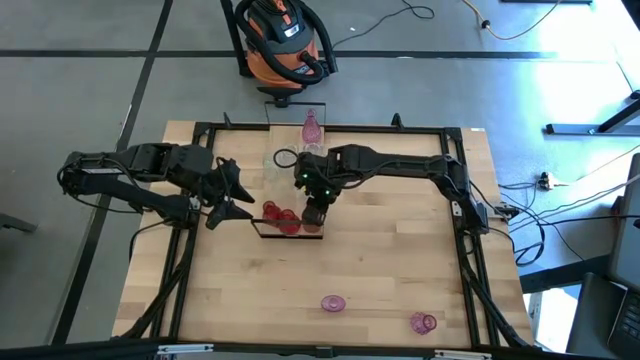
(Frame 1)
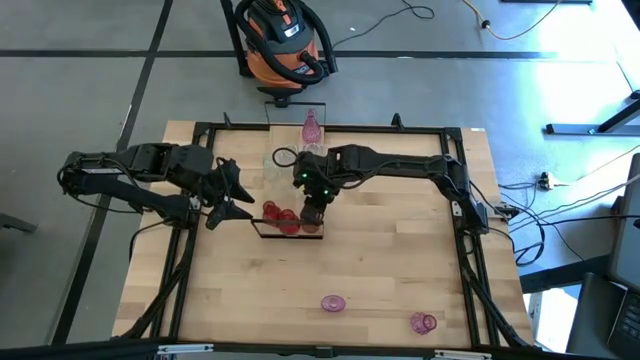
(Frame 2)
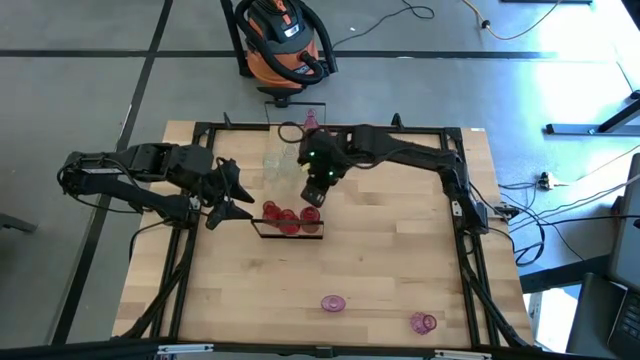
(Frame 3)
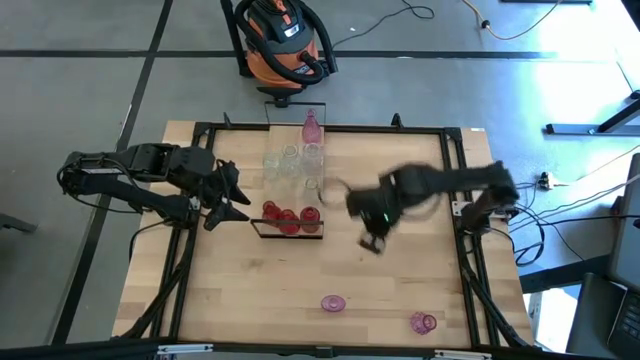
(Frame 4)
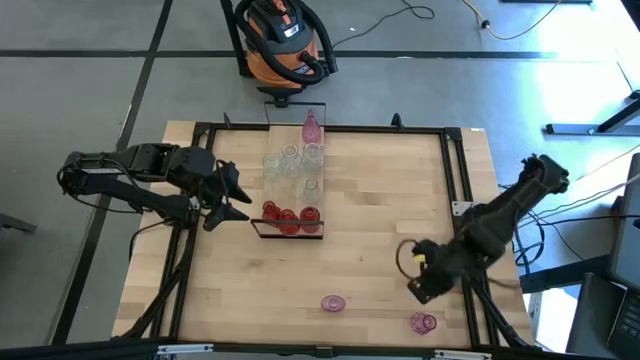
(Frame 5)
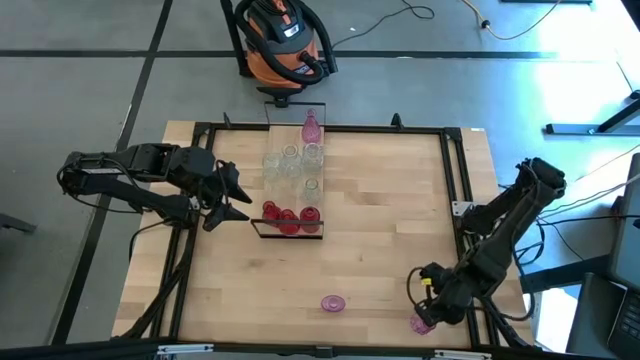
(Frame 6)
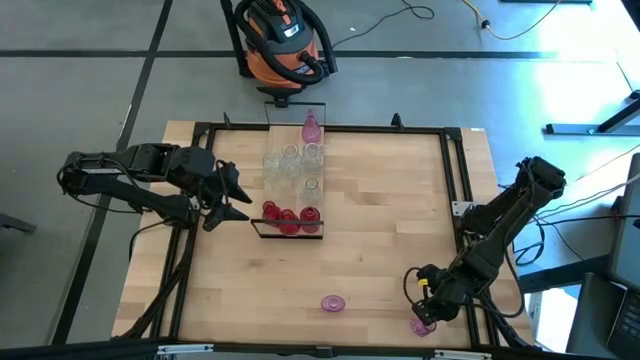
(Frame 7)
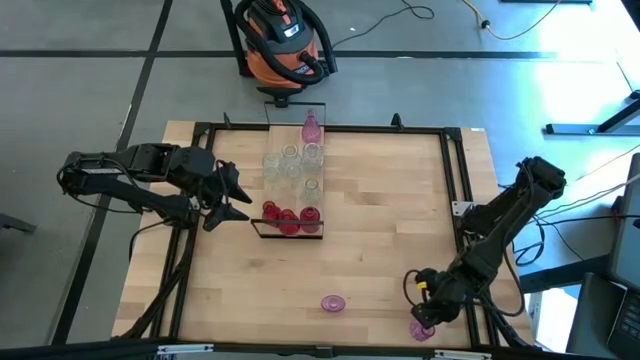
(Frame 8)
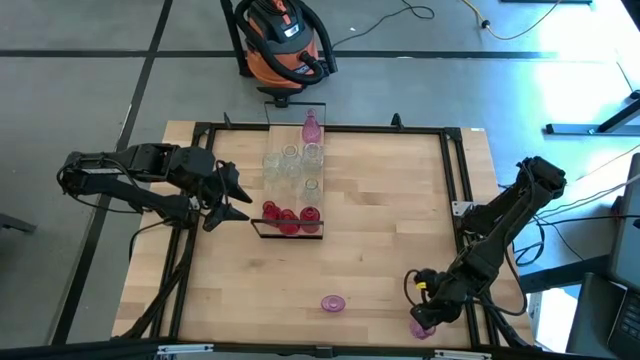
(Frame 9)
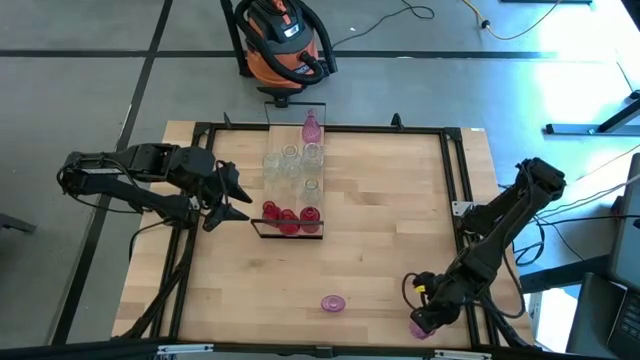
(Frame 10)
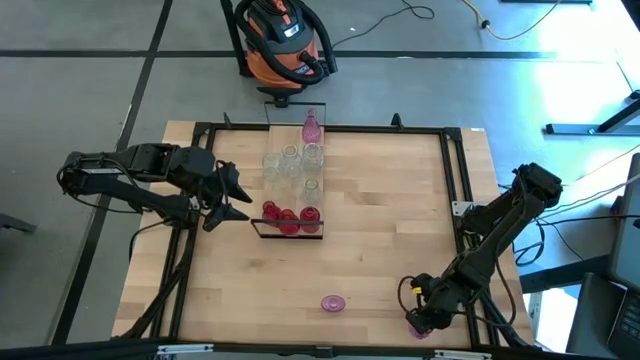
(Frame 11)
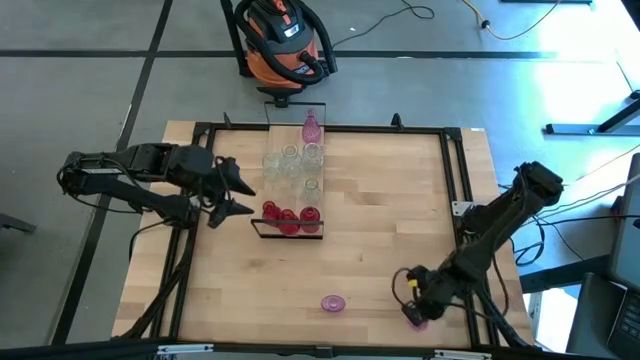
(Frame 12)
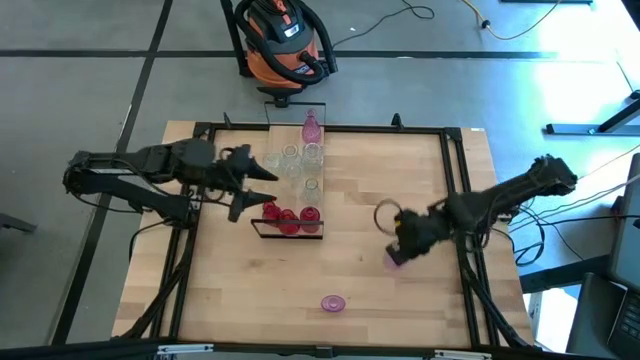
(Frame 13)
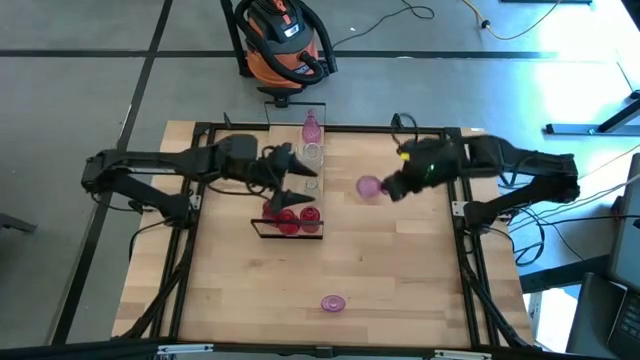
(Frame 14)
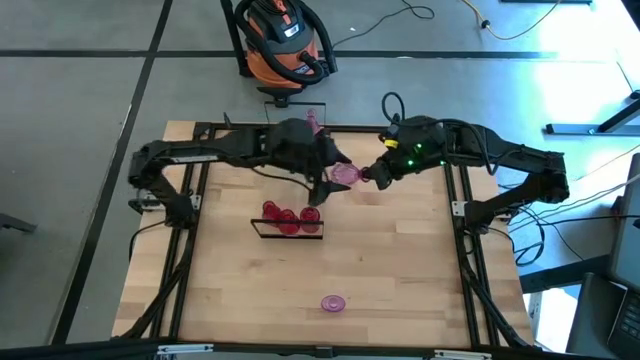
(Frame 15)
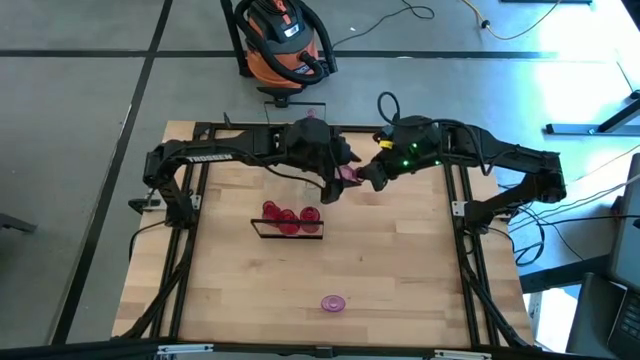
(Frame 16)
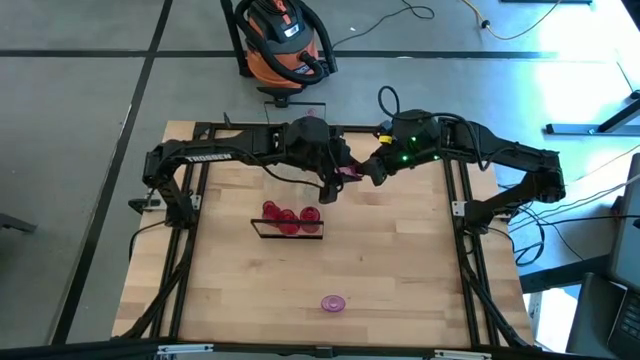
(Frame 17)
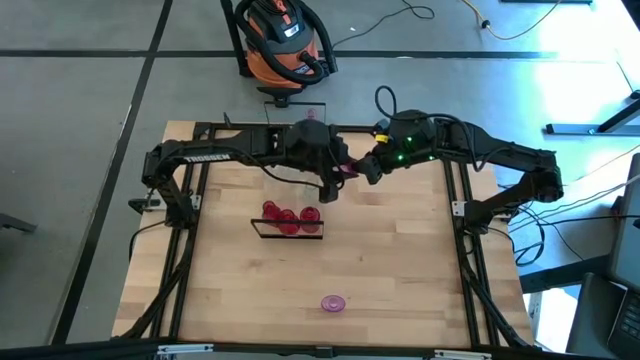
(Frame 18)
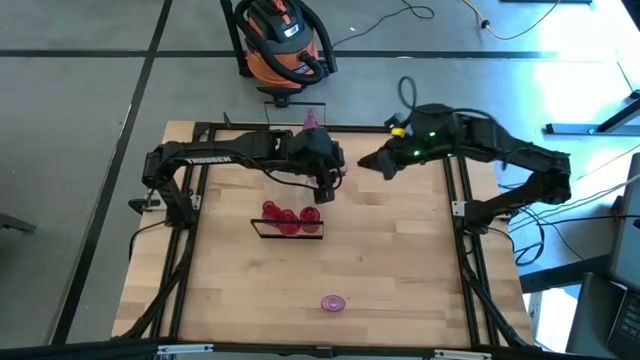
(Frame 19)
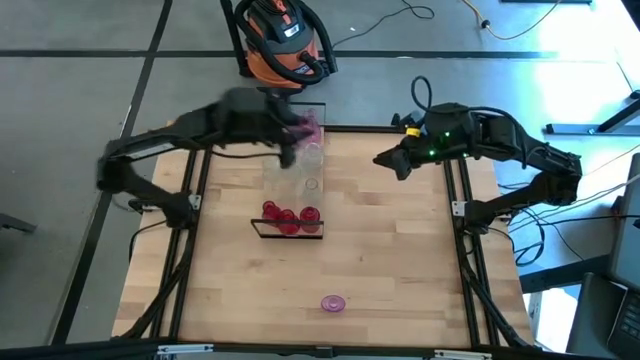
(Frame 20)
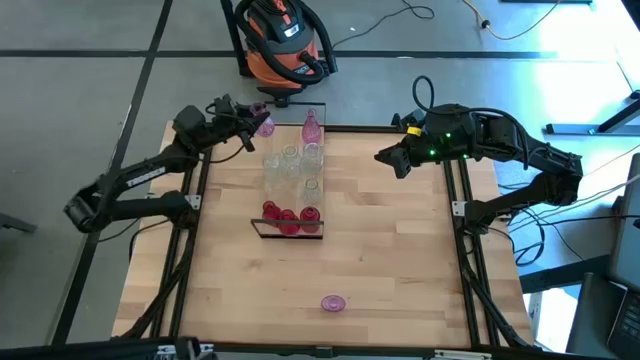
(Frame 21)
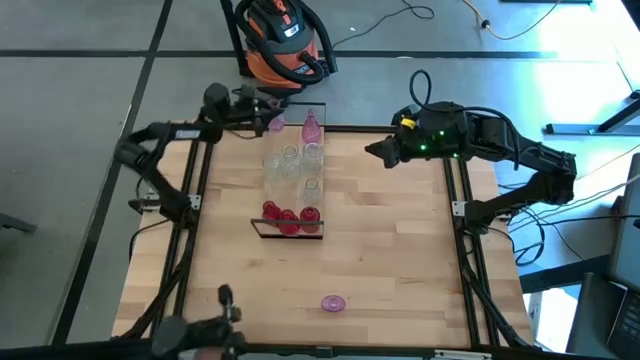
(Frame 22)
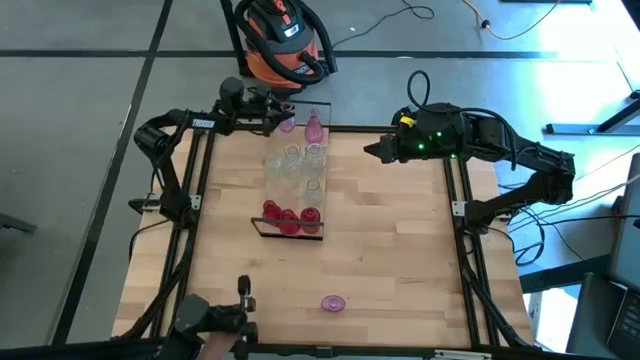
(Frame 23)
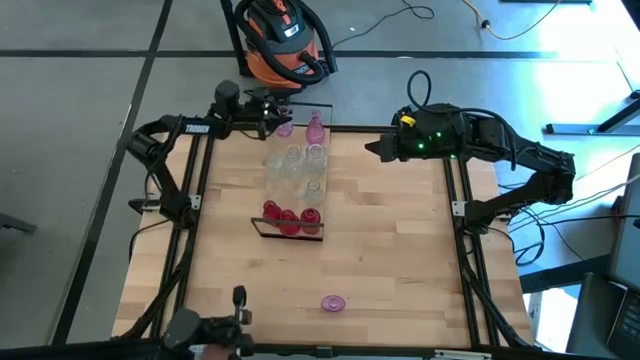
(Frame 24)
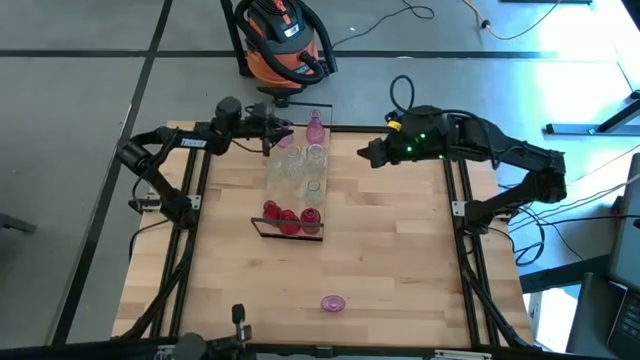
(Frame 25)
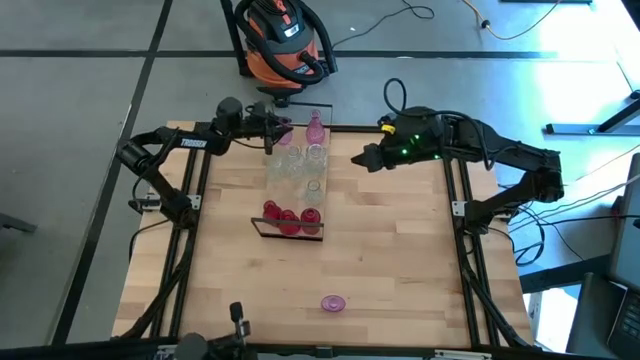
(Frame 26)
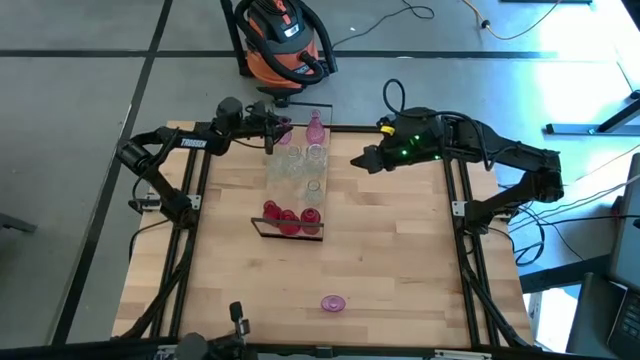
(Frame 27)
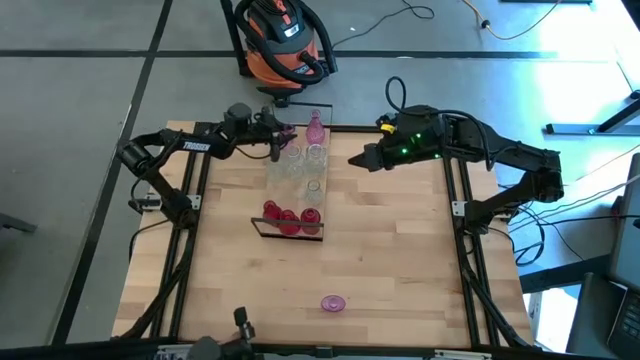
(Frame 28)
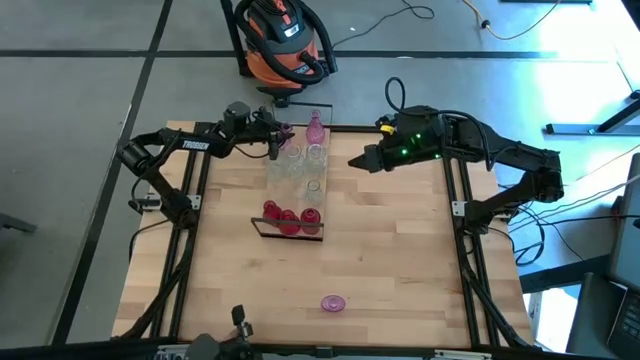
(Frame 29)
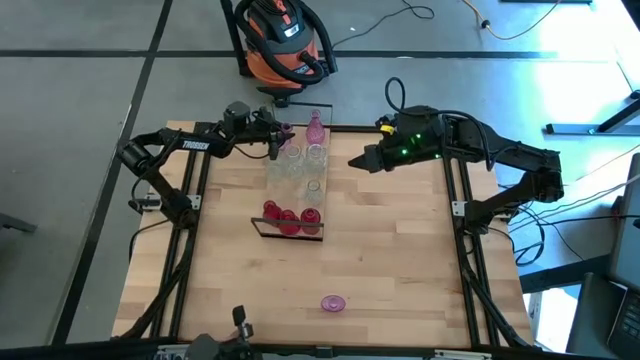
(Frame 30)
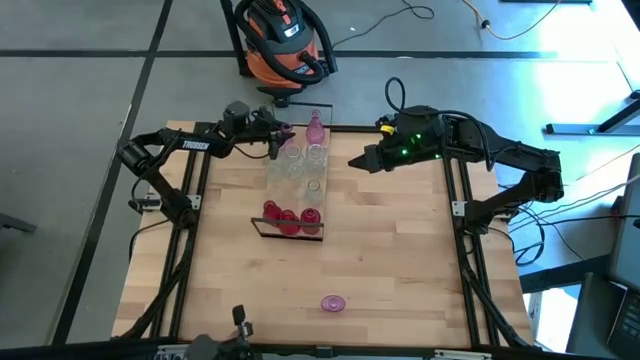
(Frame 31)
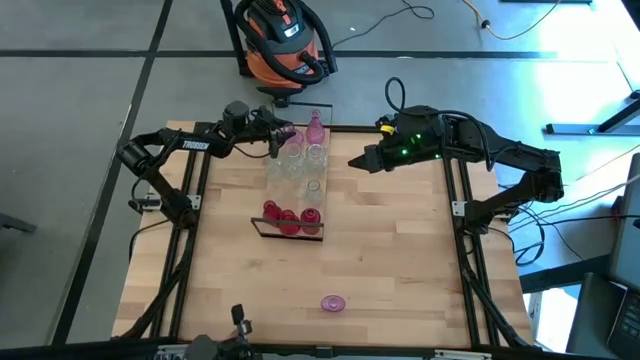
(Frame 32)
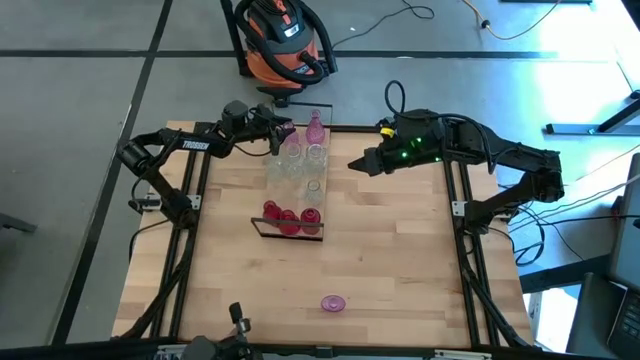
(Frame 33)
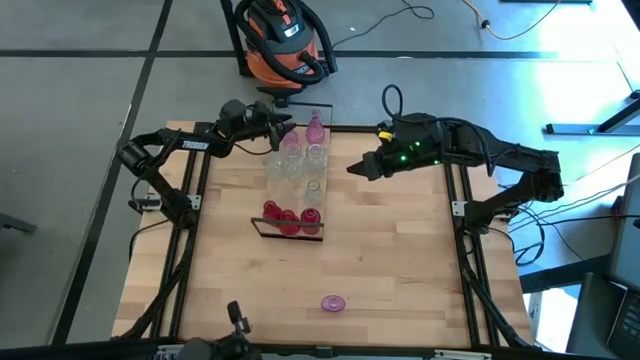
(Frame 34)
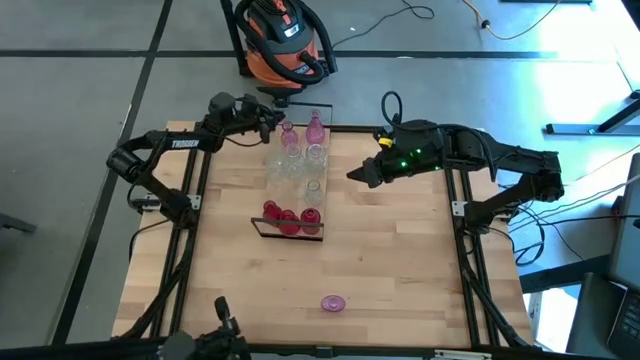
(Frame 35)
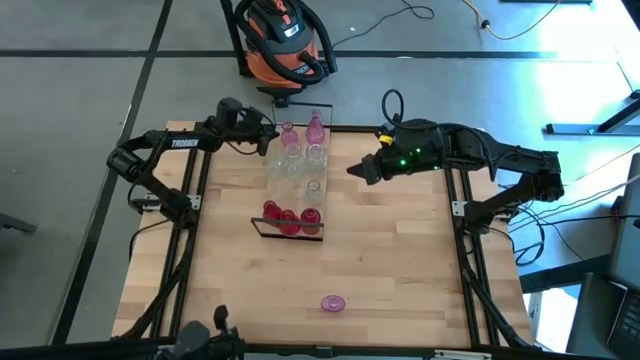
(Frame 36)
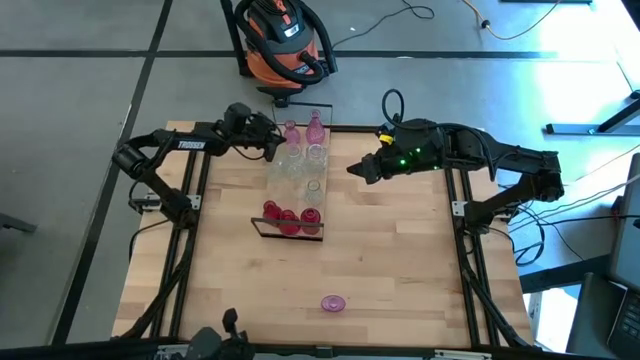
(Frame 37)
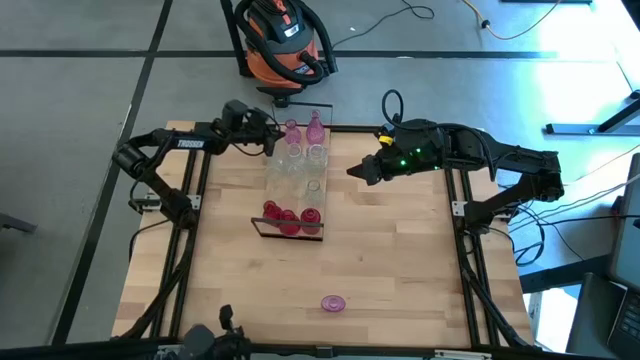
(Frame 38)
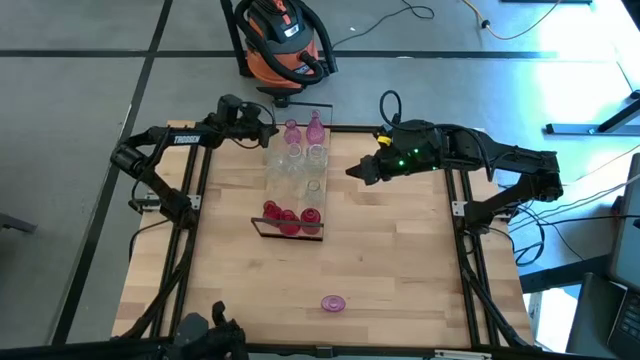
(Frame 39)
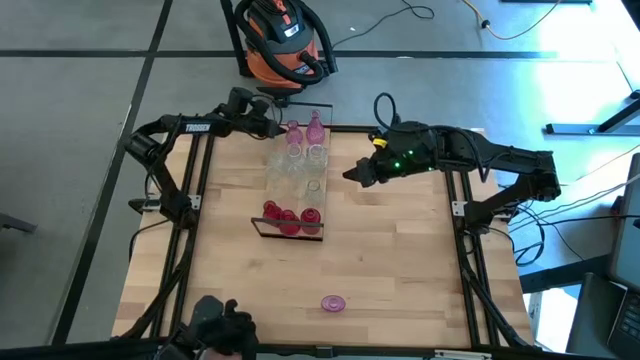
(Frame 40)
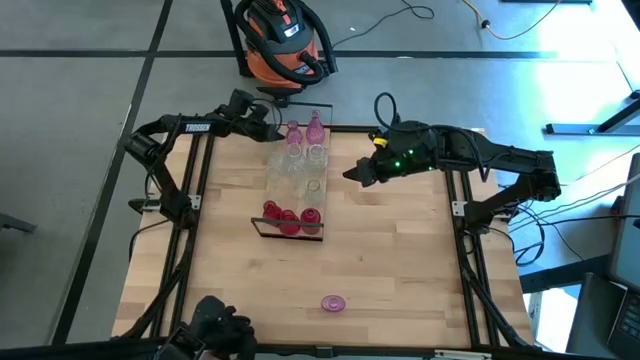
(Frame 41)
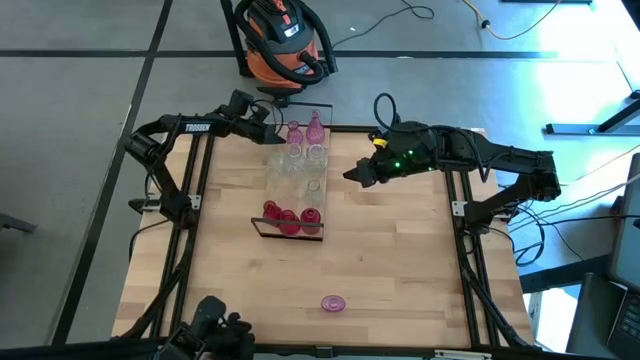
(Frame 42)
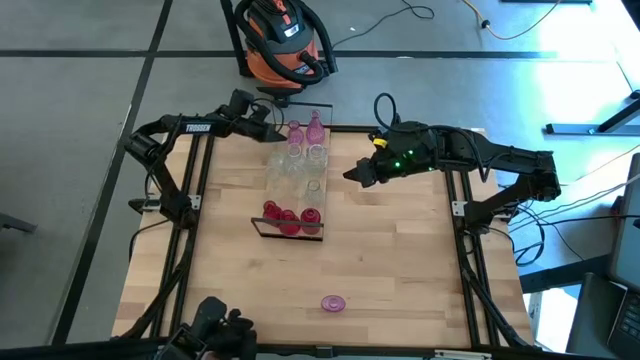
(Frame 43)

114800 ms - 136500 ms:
Task: sort vases onto shelf
Put the purple vase on the shelf

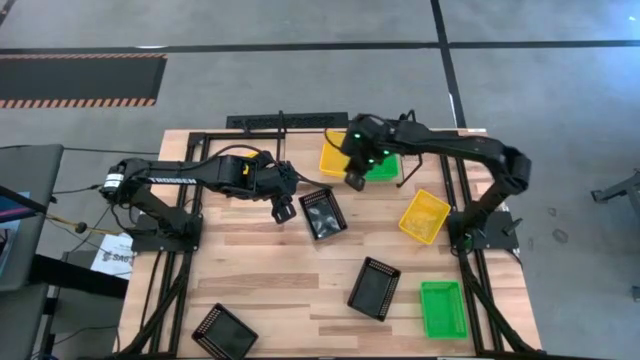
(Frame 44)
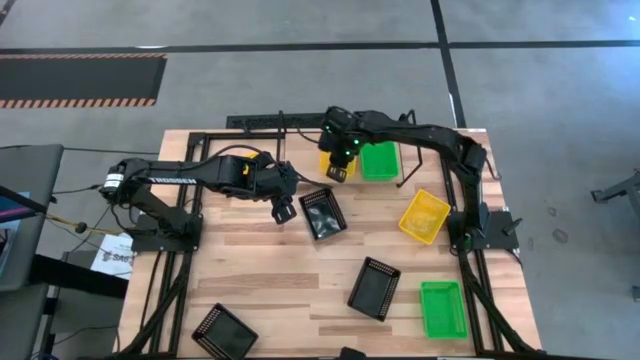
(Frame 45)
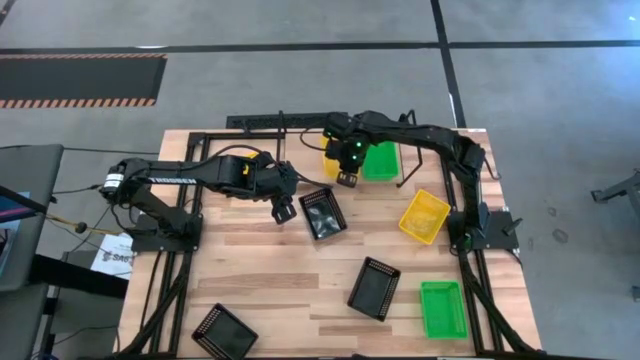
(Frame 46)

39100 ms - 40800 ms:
Task: Stack baskets on shelf by color
Adjust the yellow bin on the shelf
